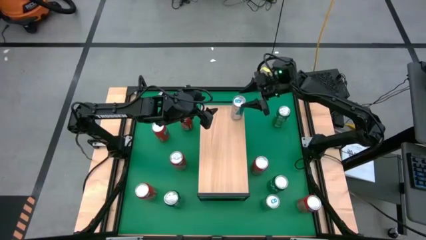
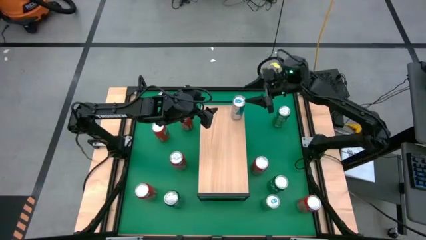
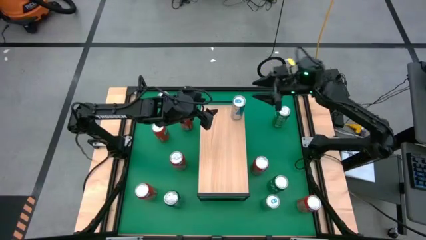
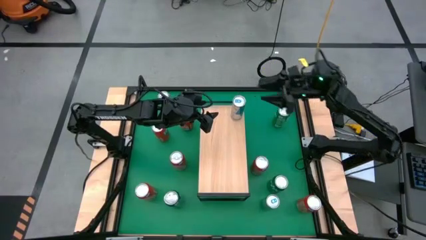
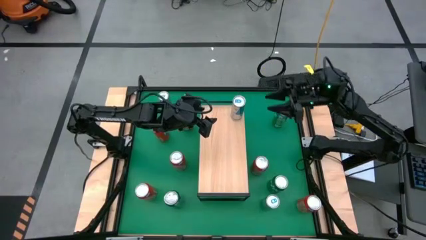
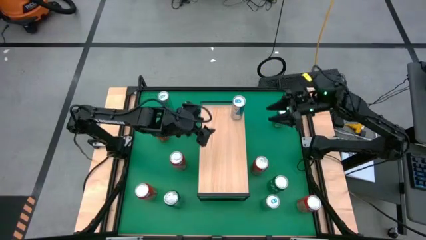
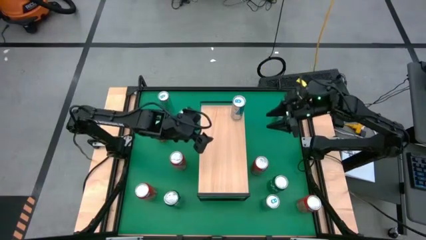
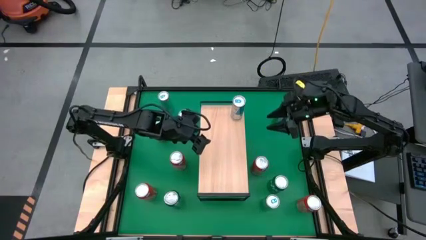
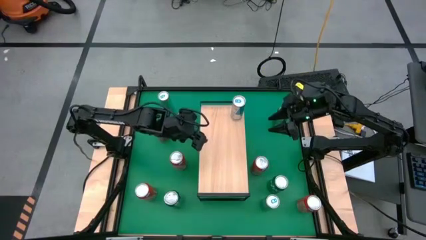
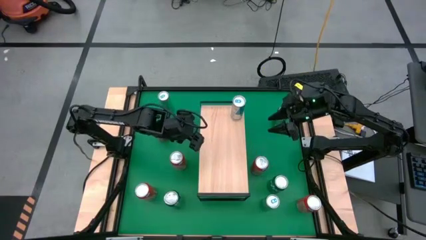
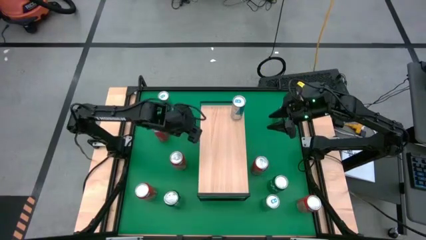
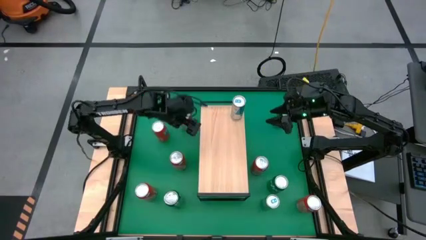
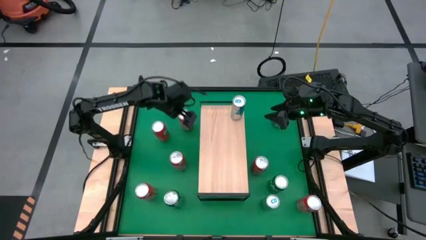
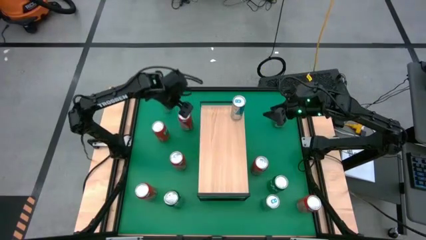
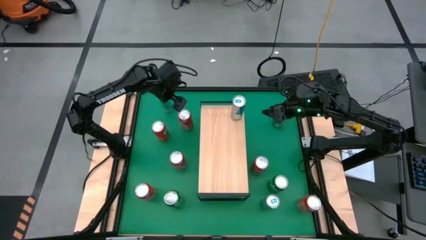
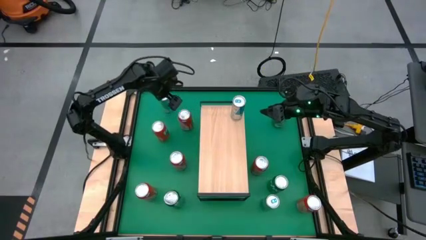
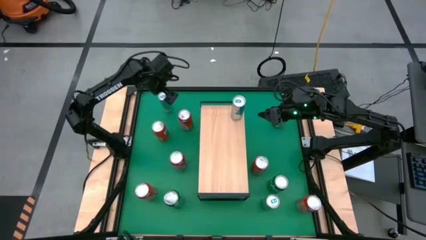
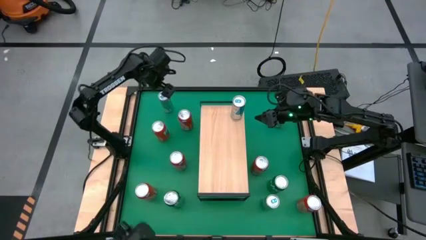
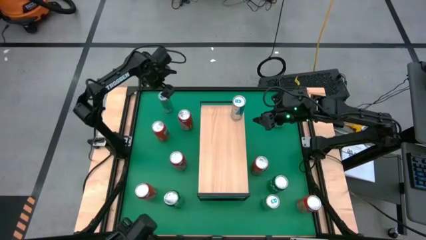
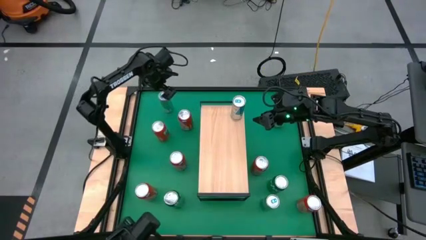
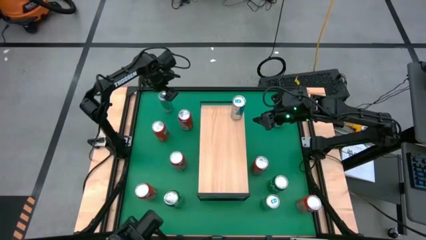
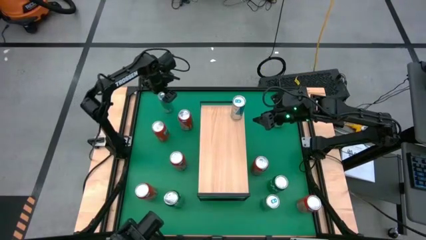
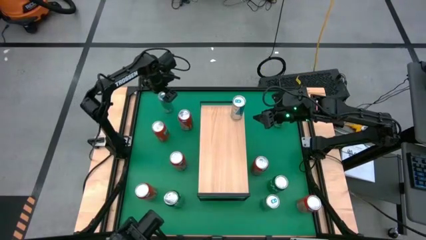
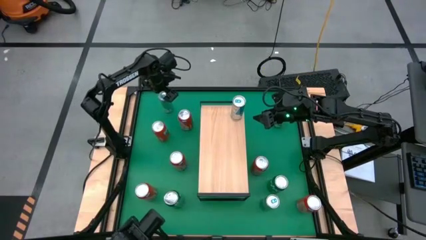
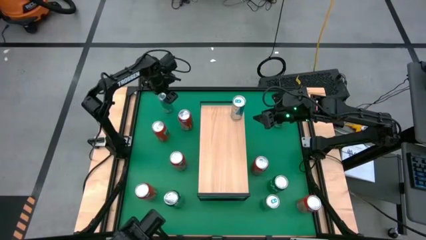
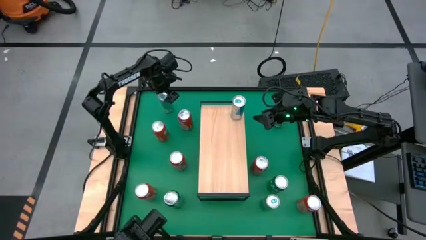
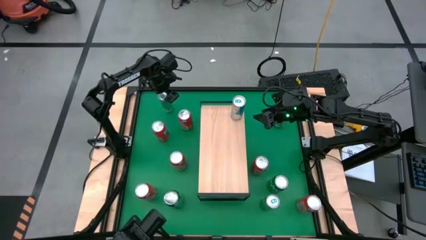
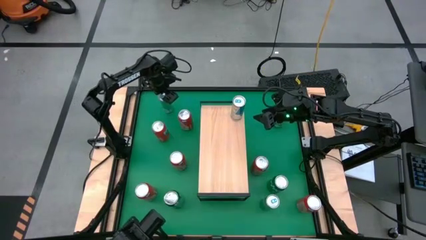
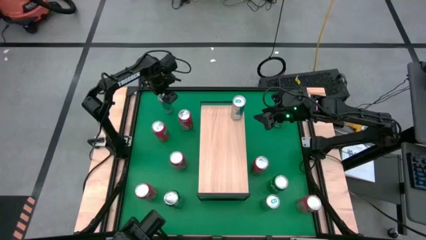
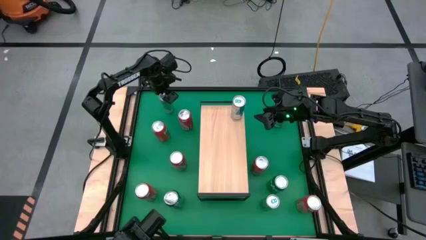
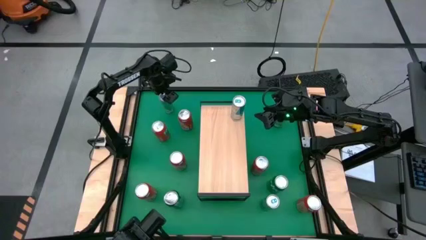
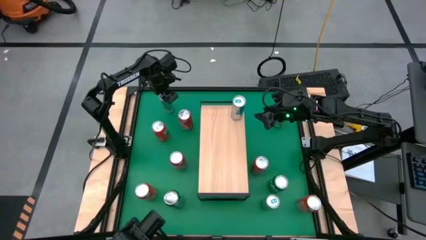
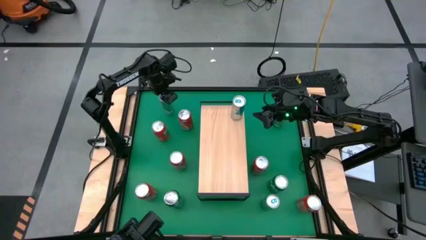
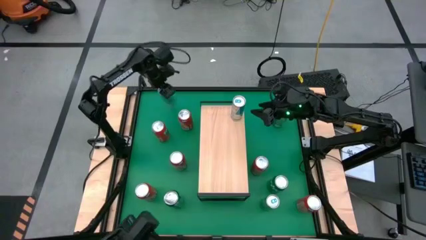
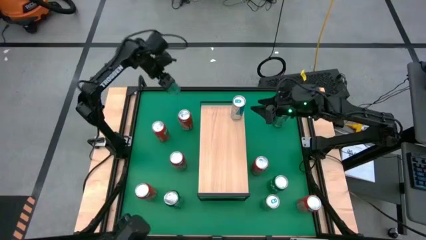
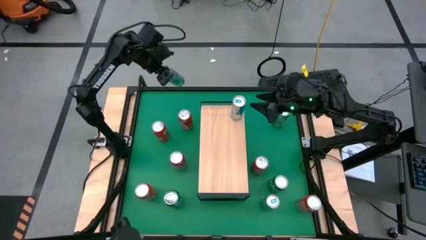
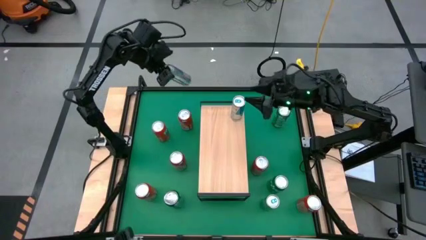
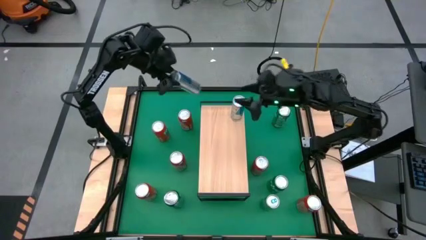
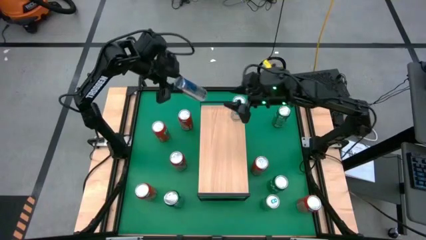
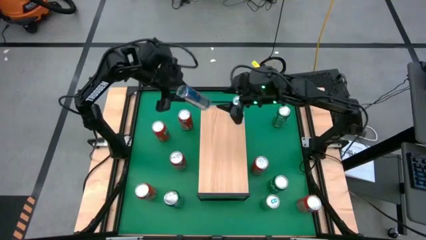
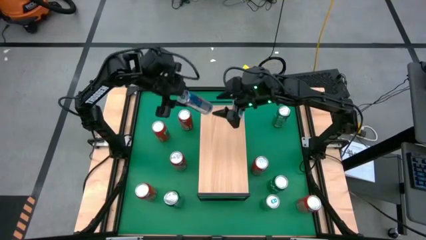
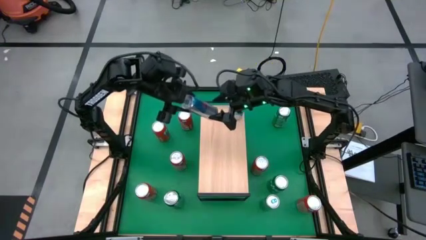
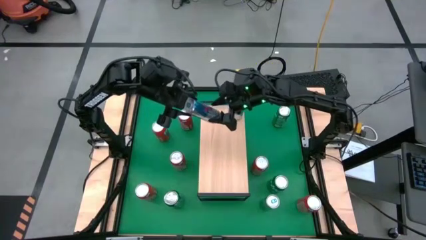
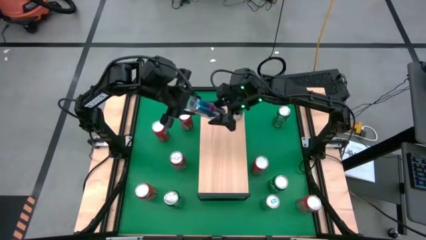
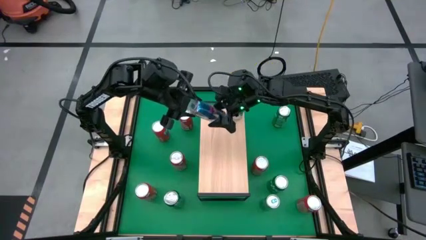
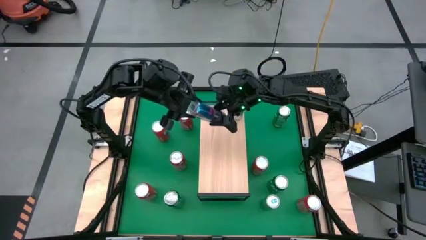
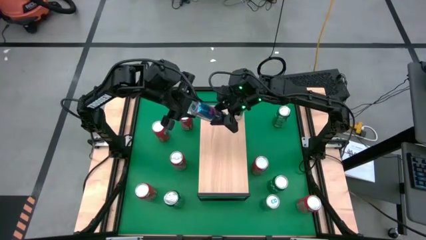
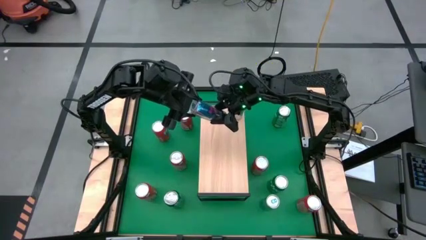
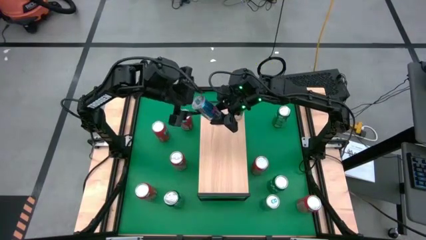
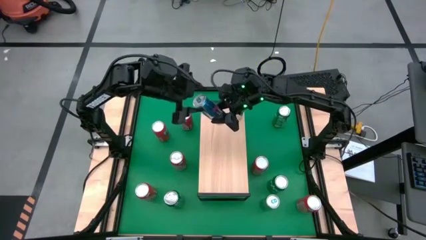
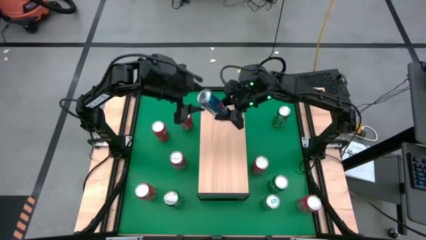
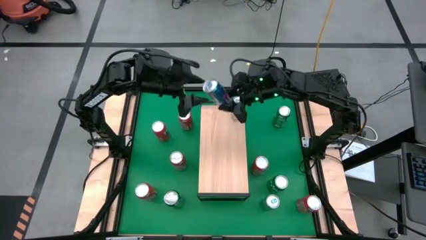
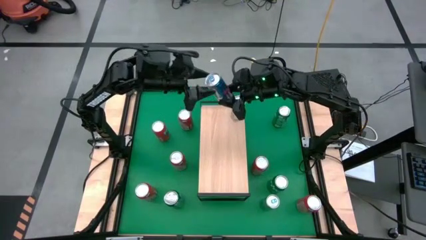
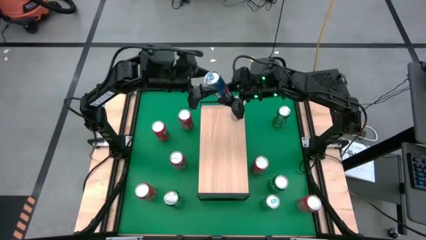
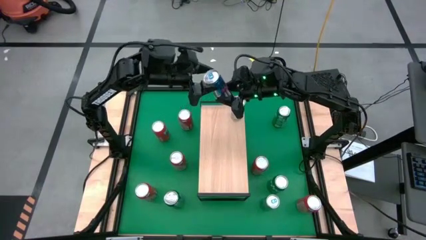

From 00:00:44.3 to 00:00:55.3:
Task: Place canned beverage on shelf
Put the blue soda can on the shelf aligned with the other blue soda can

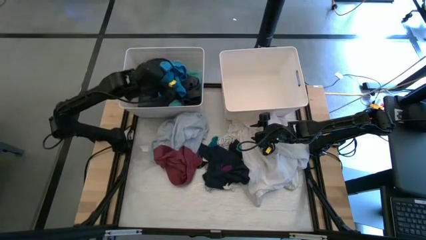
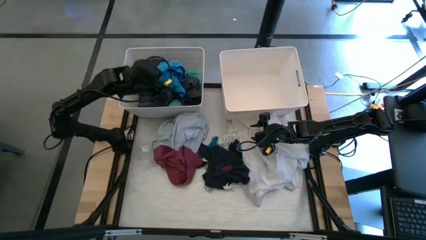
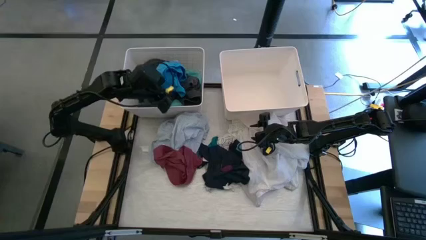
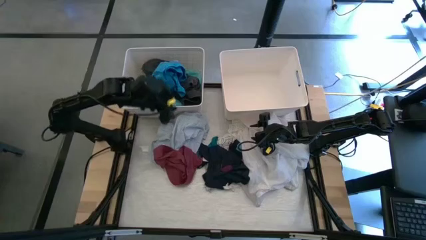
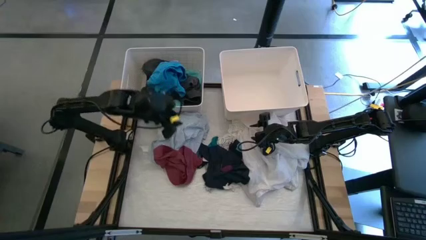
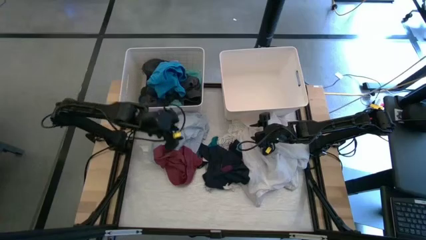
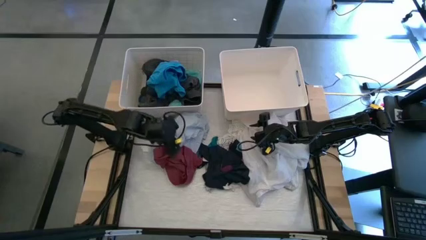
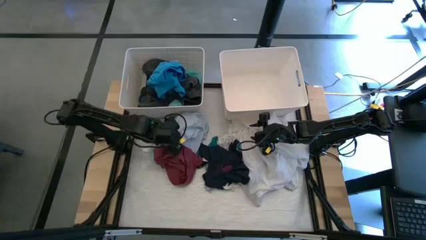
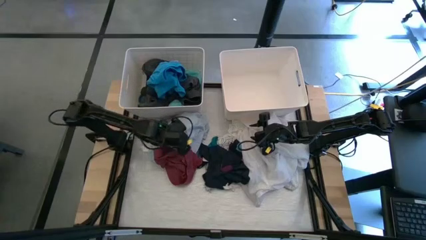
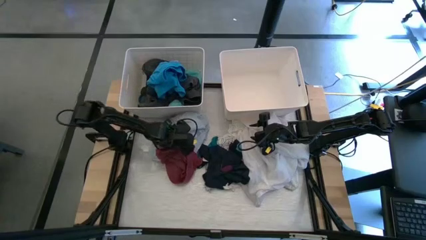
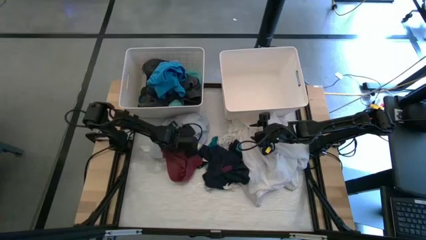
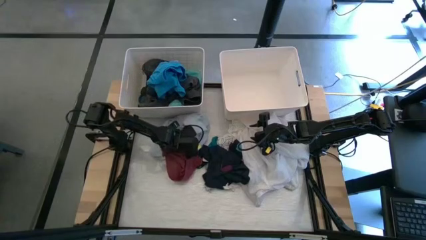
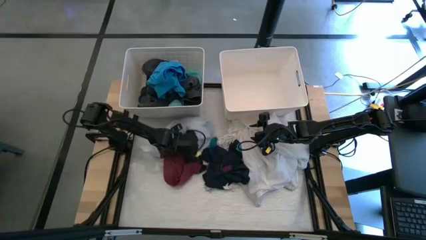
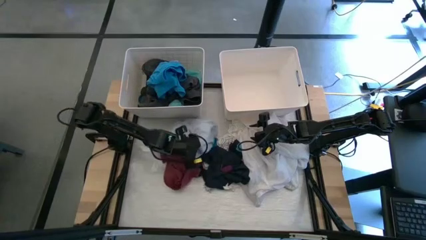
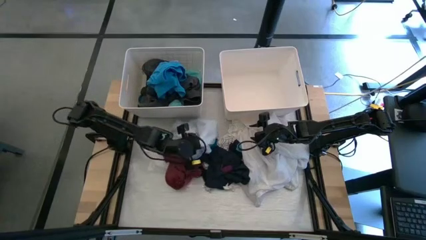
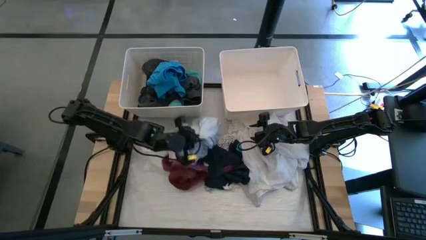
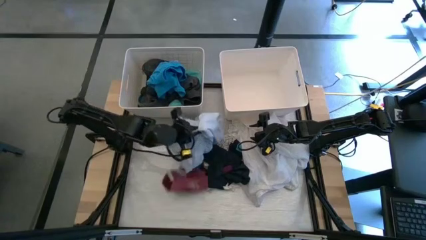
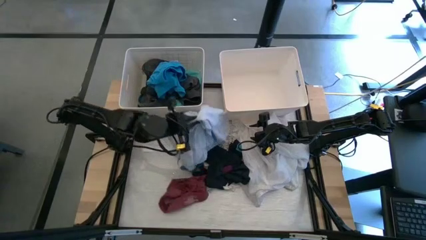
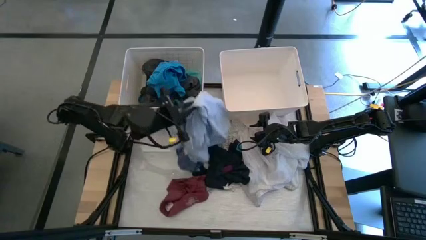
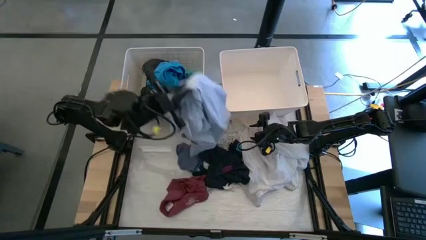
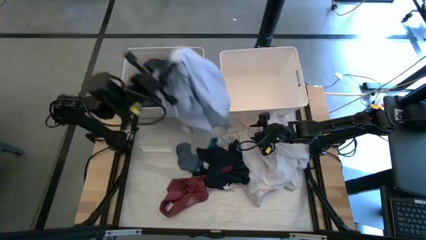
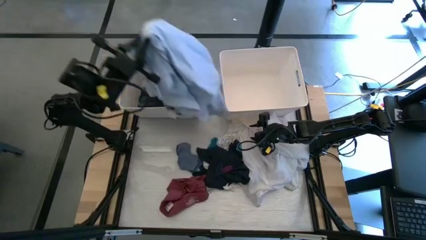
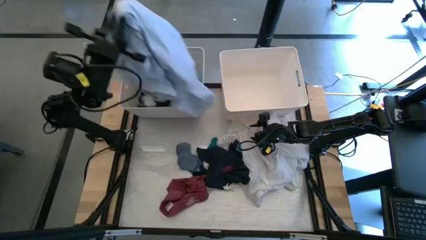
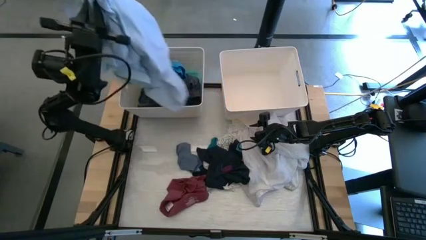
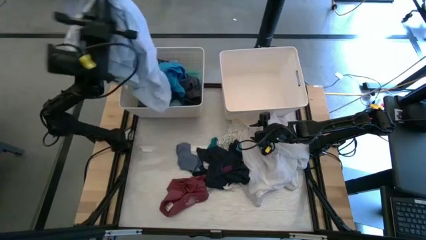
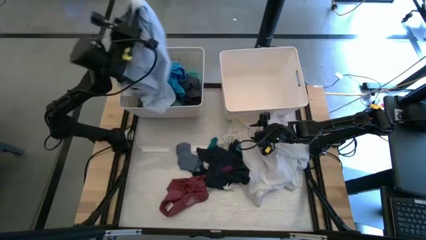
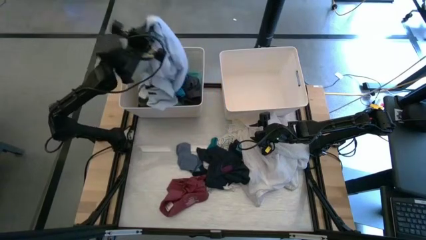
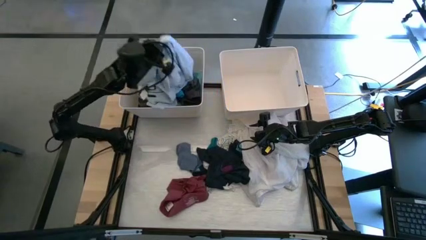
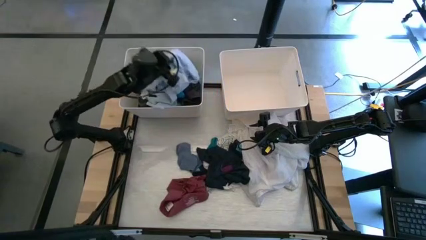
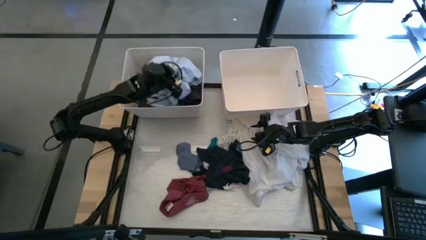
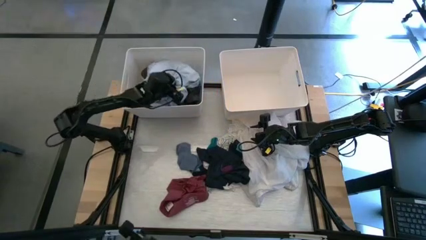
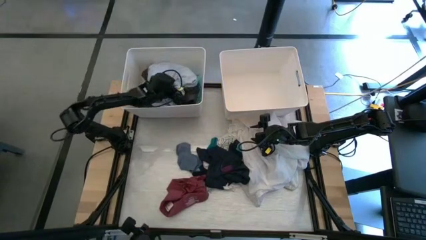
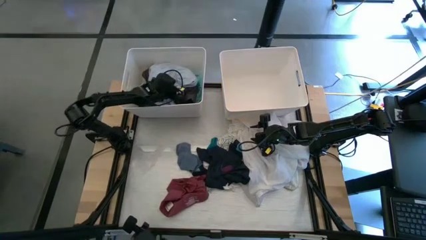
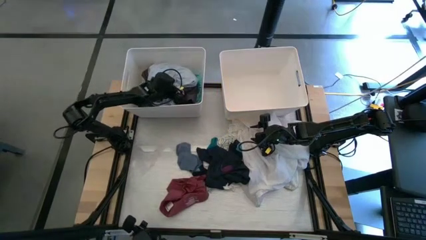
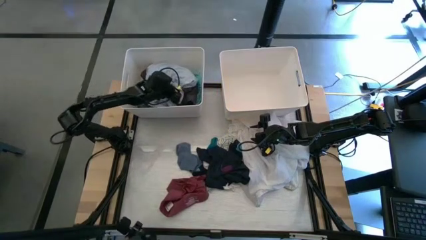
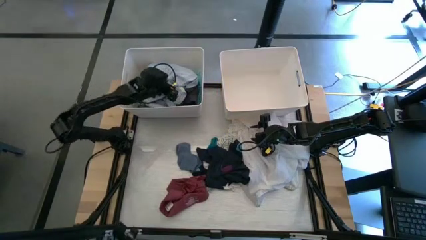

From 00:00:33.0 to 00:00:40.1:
Task: Sort clothes
Put the white patterned polo shirt into the left white laundry bin
